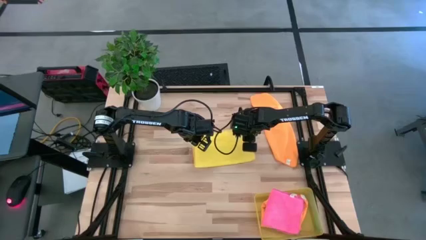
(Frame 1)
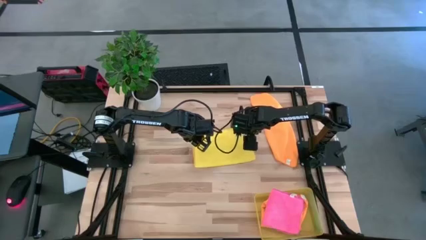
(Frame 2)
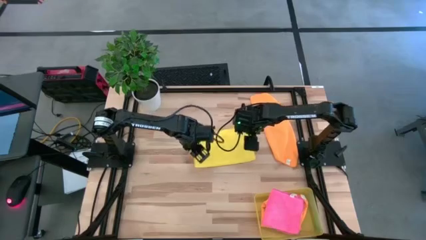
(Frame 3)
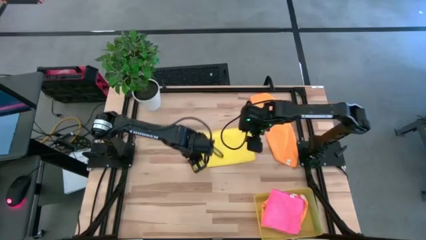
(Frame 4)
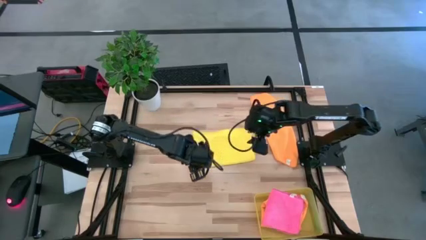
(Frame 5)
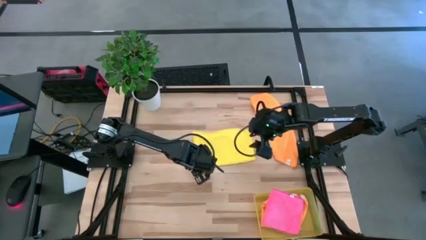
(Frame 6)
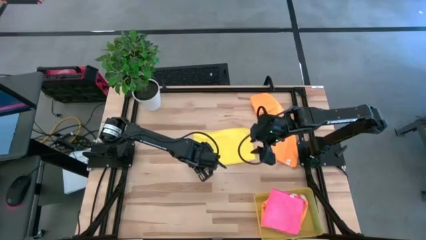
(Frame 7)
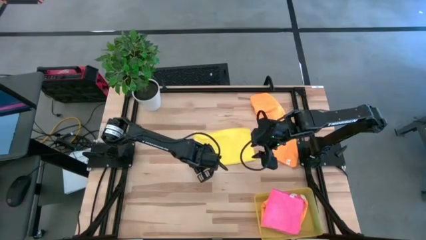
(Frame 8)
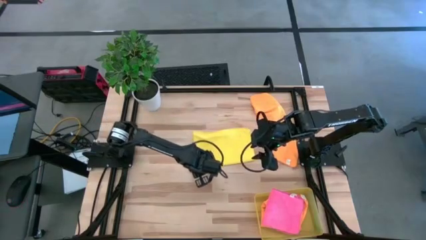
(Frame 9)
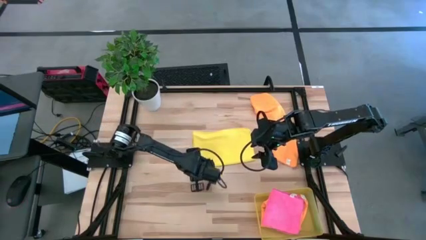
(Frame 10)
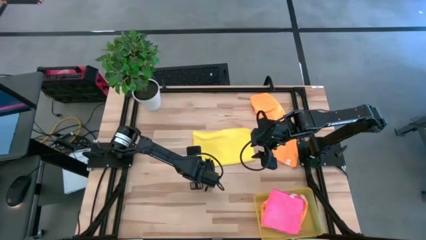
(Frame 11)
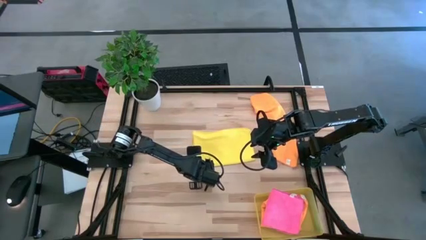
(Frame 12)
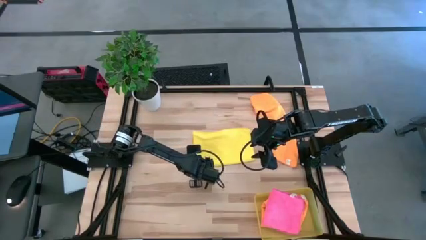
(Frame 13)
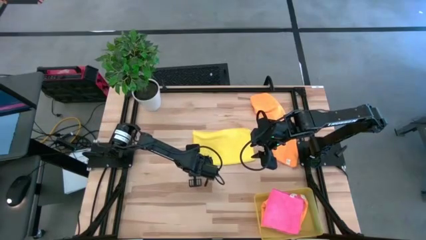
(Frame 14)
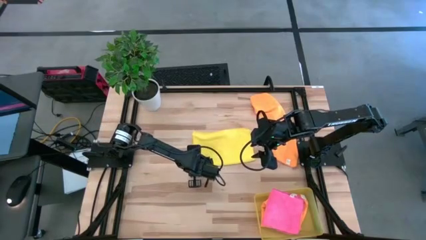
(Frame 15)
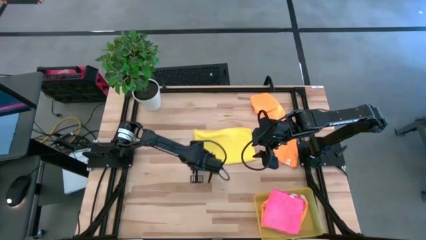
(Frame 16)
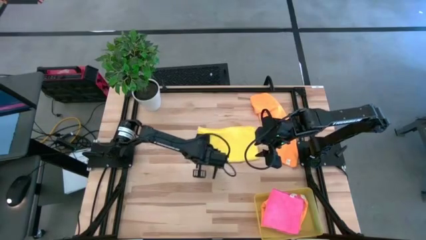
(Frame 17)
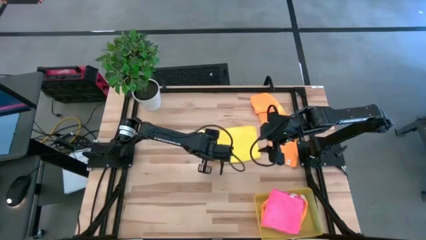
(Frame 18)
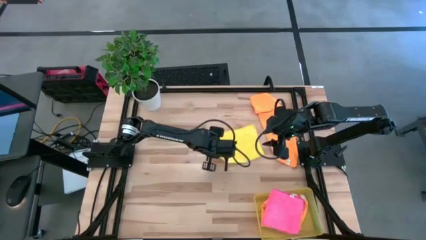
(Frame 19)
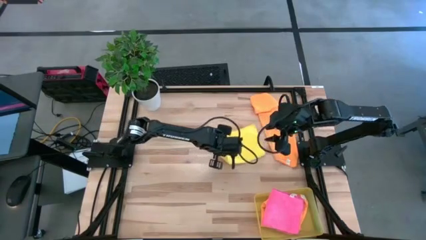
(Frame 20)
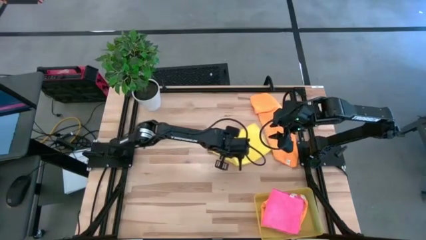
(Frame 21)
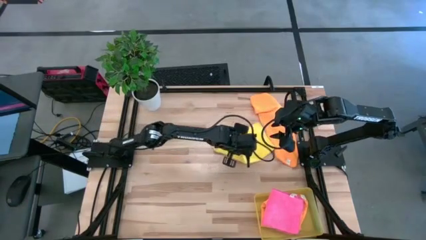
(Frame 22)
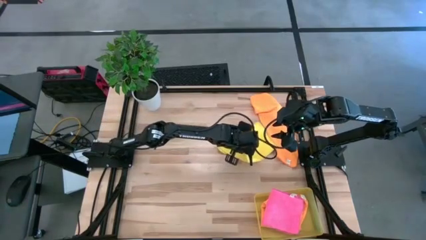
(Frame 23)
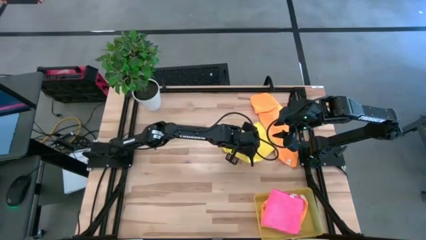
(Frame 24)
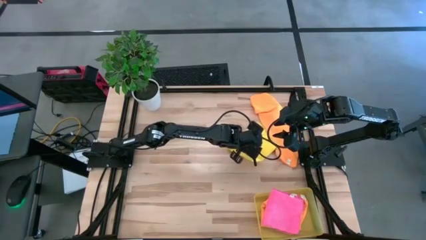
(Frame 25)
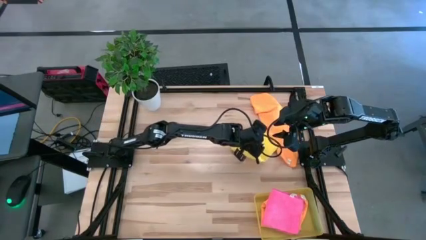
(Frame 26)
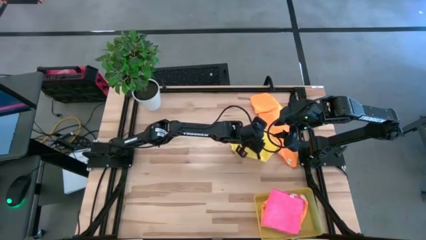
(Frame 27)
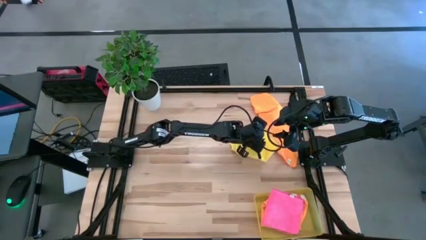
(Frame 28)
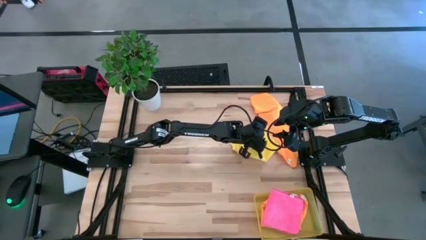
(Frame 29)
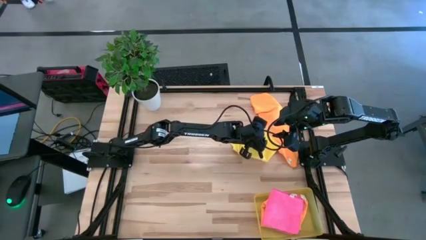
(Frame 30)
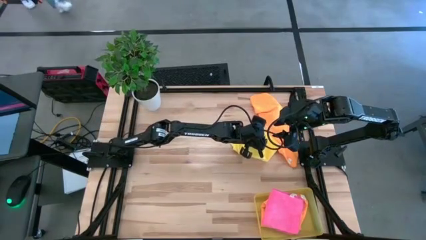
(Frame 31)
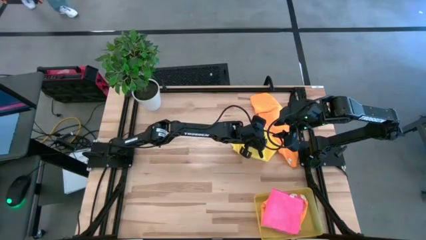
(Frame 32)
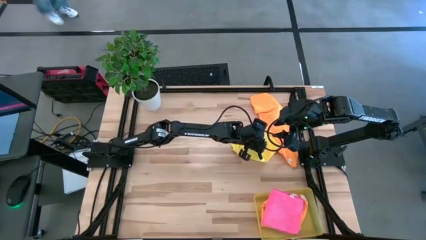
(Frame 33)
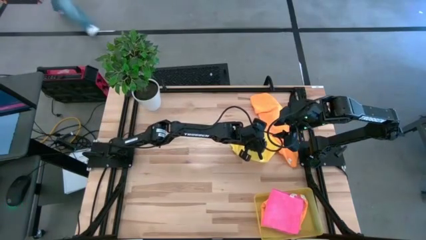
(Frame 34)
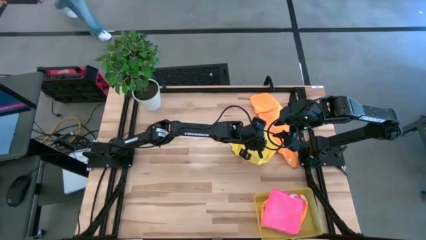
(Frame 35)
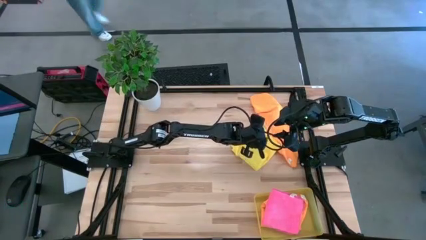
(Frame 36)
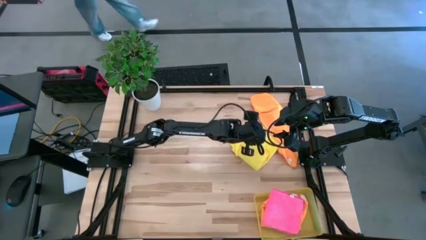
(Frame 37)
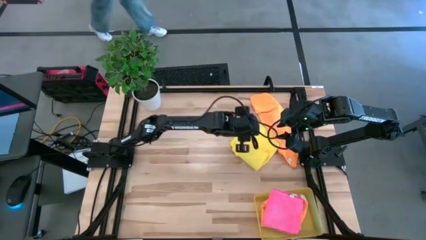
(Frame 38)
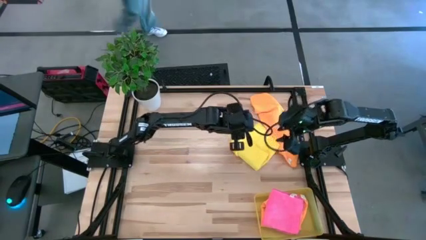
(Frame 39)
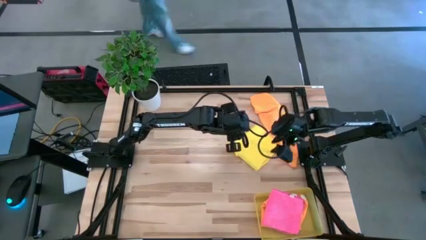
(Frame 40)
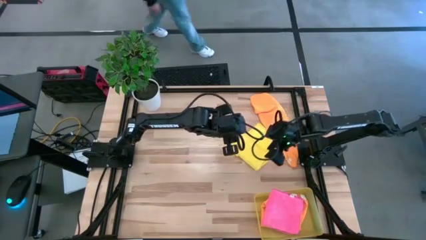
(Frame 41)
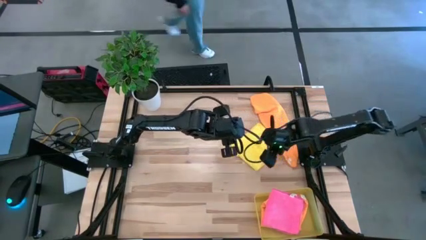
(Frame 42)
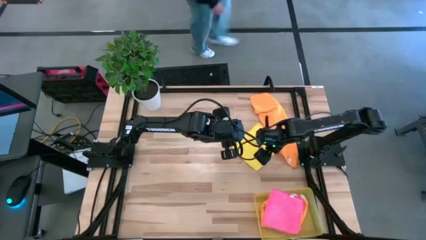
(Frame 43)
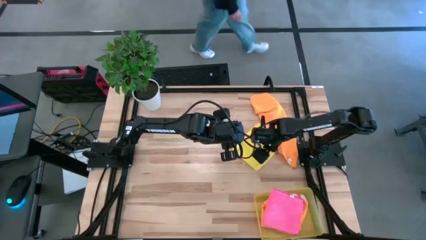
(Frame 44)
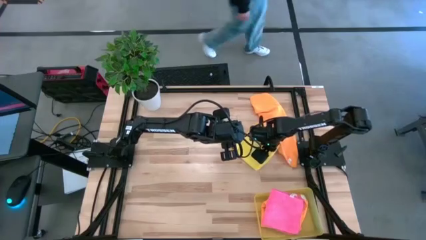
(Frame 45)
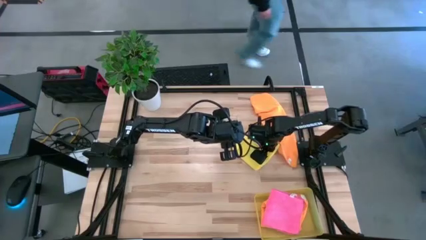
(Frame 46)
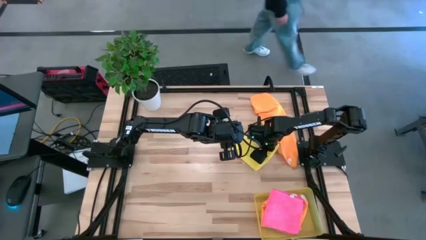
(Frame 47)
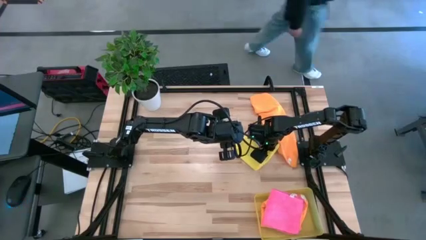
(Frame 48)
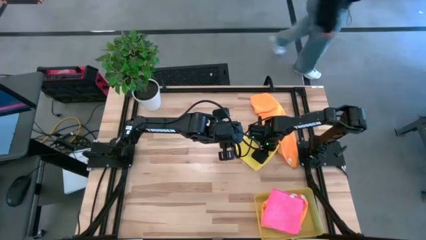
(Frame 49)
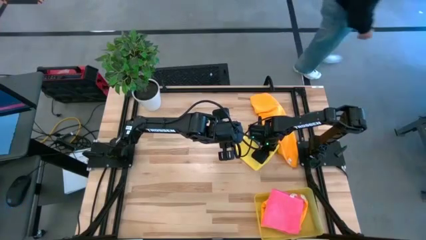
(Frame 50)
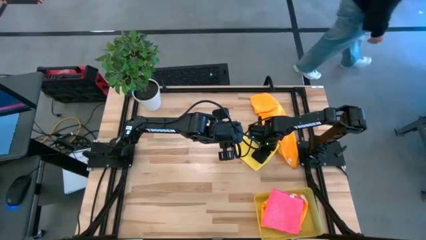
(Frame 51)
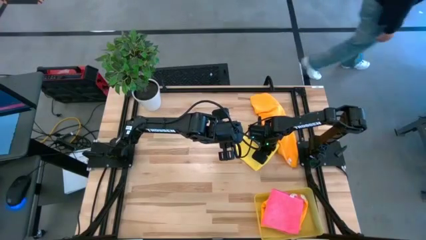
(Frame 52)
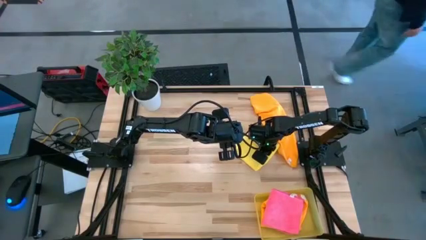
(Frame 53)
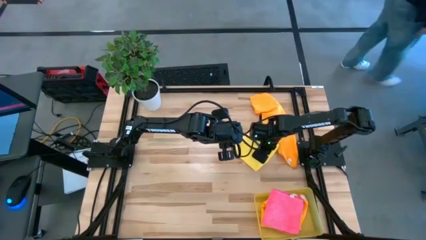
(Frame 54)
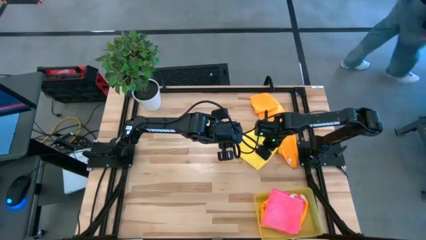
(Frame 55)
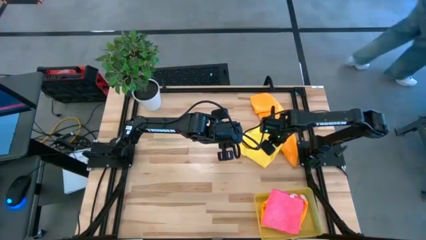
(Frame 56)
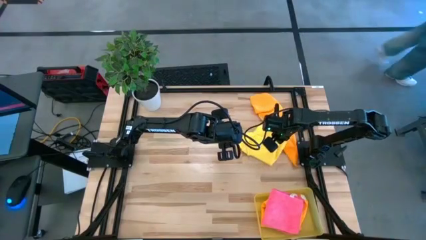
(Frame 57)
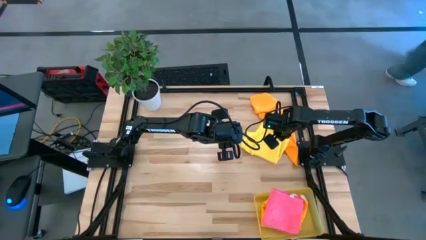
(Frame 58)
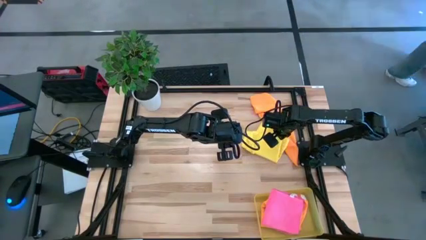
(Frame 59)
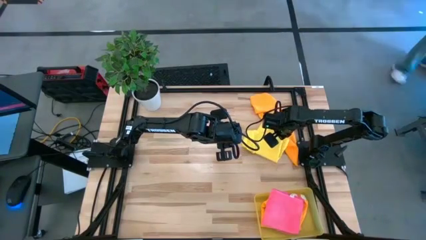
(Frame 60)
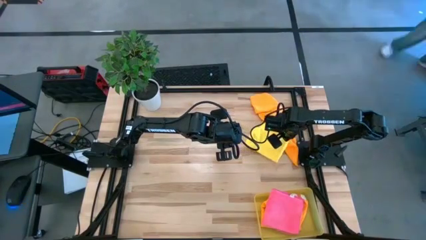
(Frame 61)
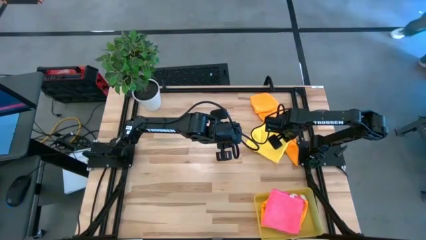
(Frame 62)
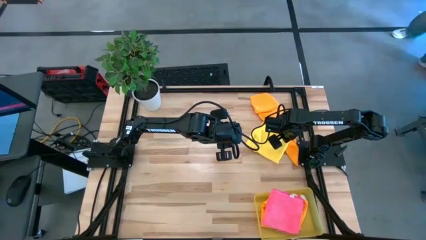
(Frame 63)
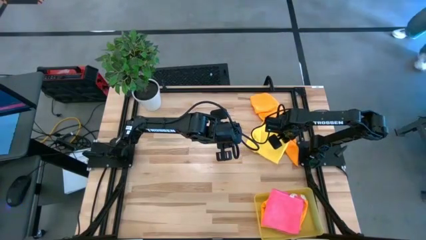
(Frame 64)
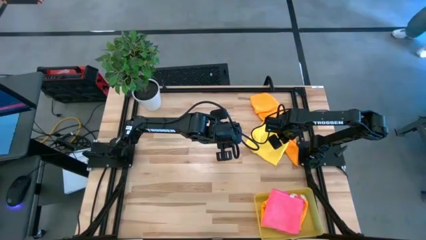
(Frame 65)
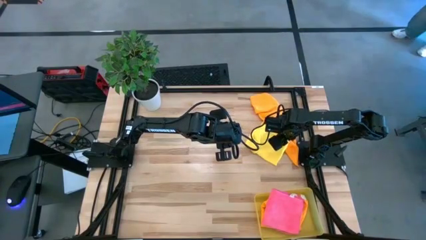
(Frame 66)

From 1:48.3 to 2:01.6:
Task: Fold microfiber towels
Fold the yellow microfiber cloth

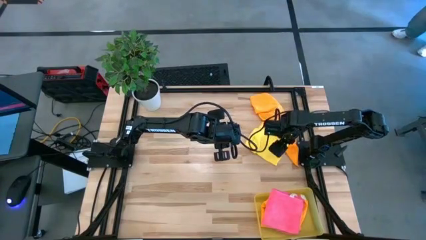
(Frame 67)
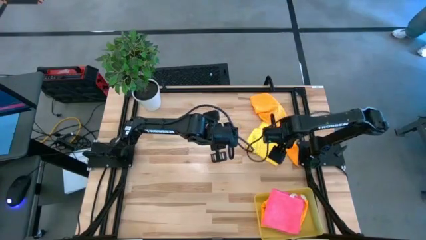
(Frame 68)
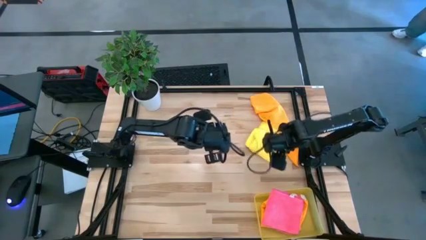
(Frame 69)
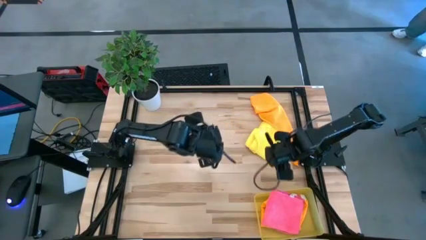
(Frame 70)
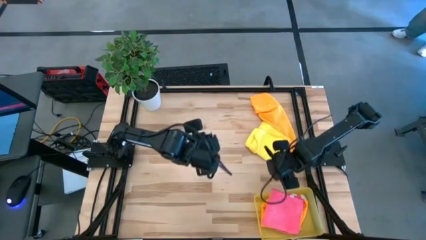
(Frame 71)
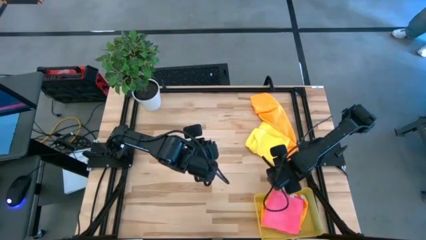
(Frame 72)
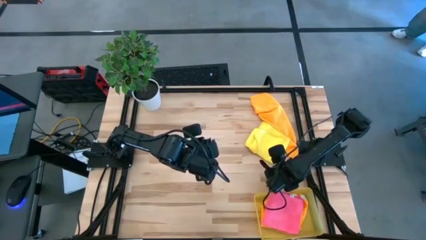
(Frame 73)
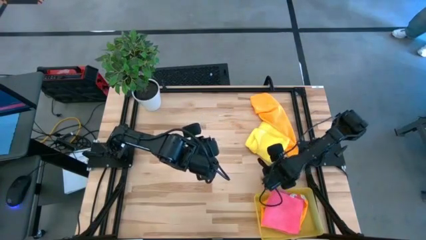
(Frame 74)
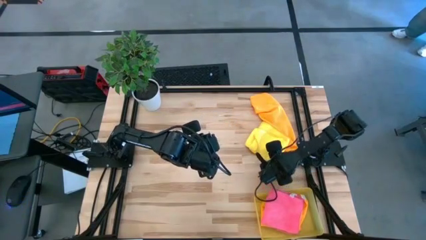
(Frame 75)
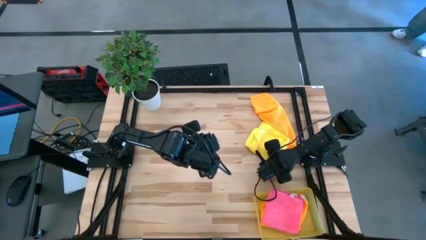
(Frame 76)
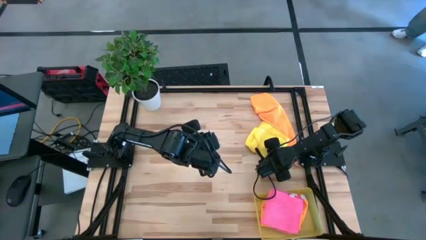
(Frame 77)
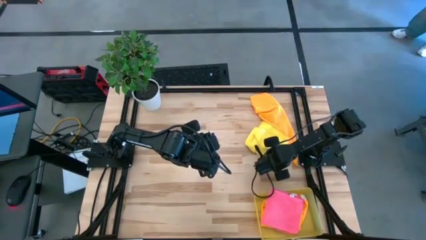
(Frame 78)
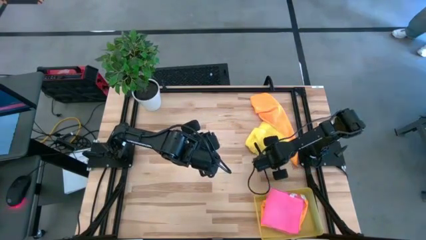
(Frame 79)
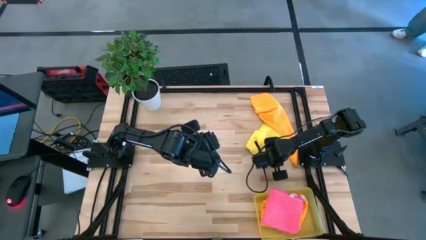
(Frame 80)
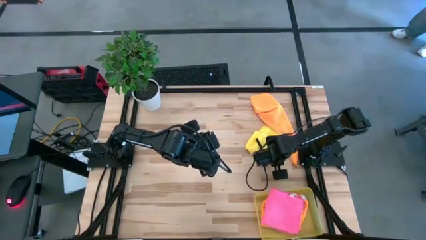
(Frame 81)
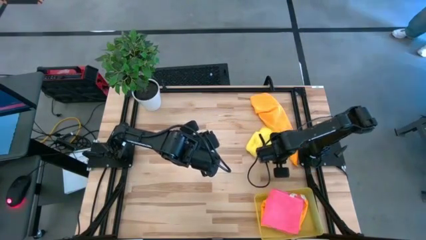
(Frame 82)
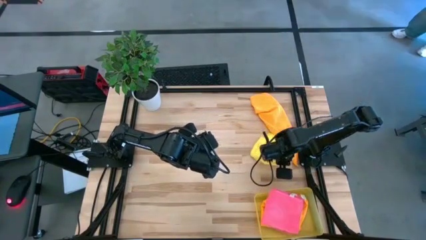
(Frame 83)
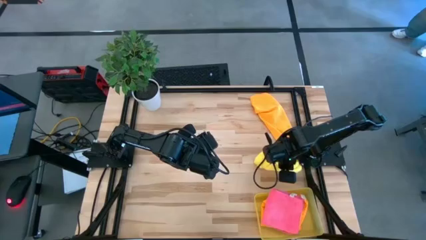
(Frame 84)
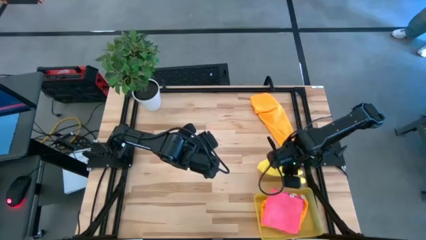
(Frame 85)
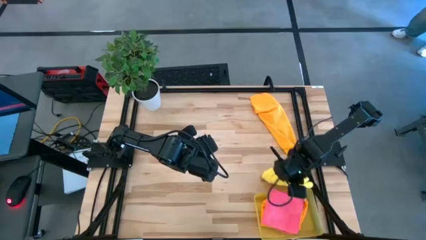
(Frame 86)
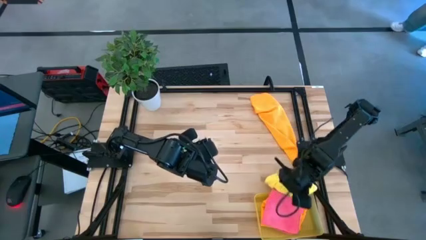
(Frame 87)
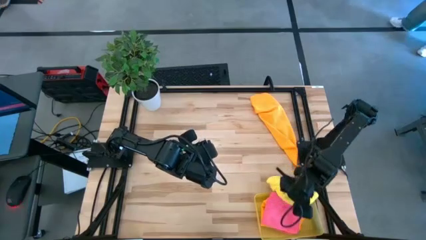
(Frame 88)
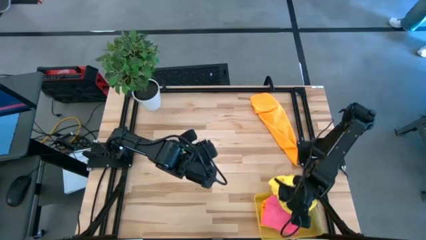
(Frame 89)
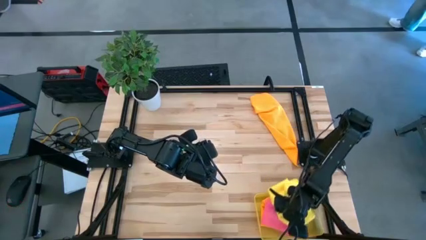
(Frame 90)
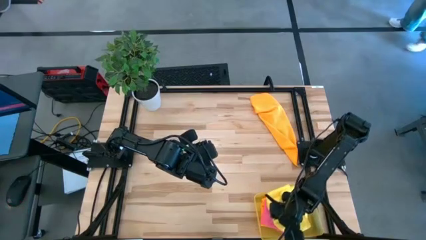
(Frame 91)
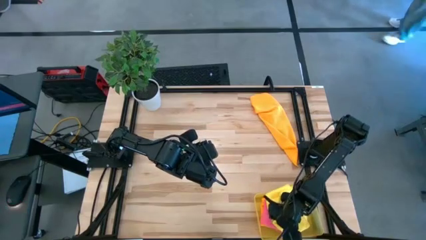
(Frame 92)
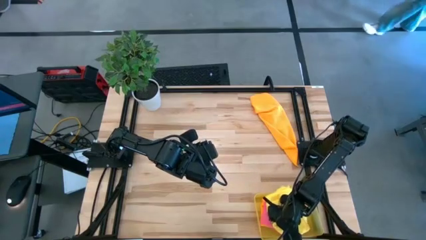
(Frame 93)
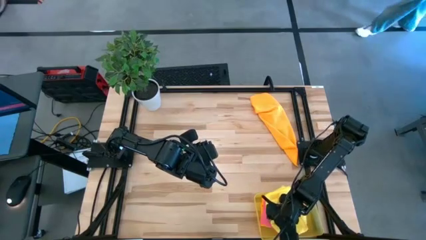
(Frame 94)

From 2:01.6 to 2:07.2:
Put the yellow microfiber cloth into the bin
